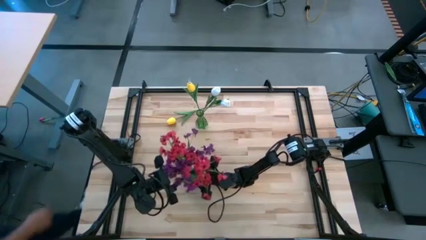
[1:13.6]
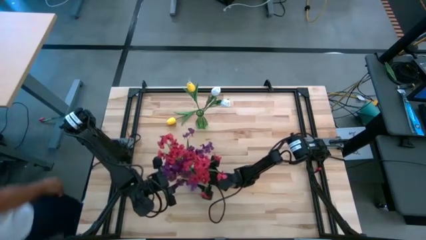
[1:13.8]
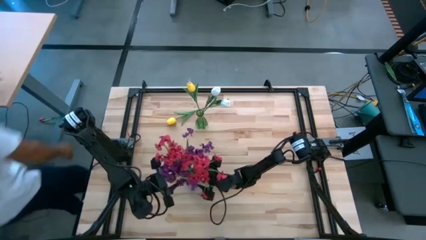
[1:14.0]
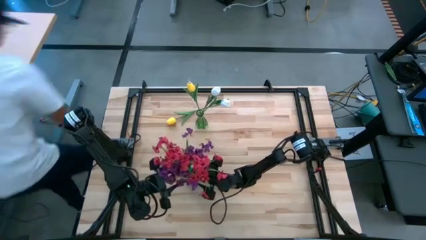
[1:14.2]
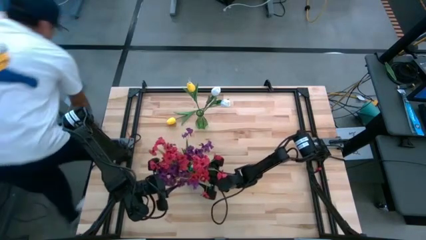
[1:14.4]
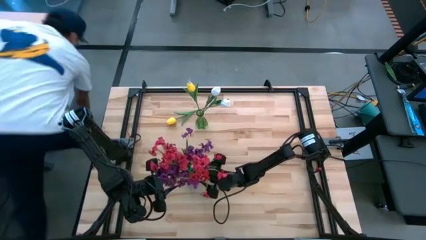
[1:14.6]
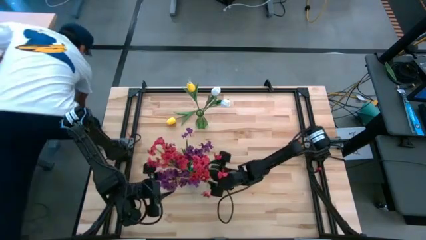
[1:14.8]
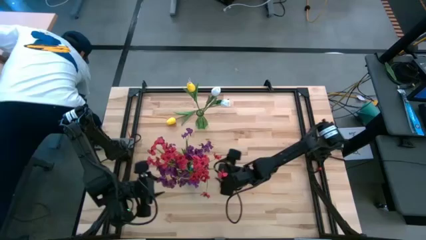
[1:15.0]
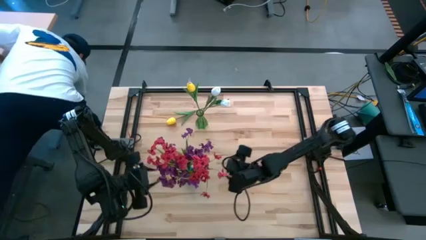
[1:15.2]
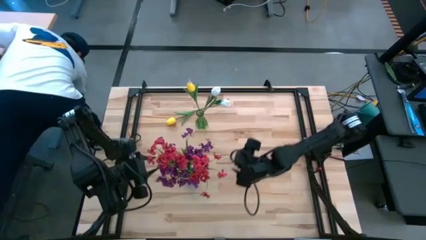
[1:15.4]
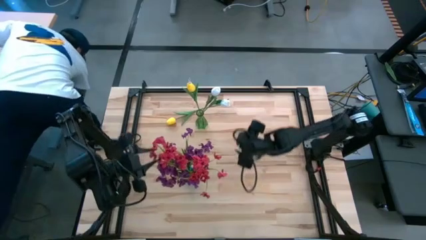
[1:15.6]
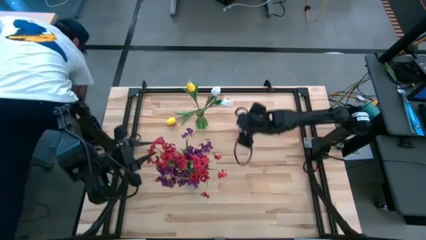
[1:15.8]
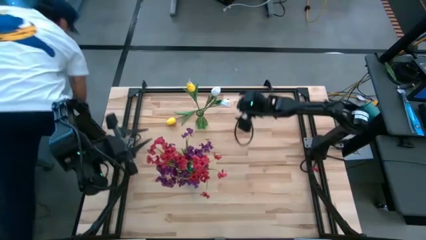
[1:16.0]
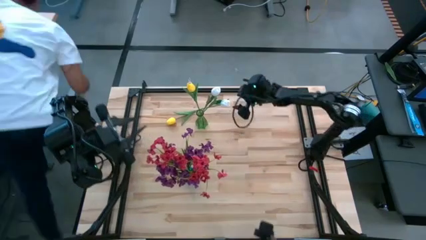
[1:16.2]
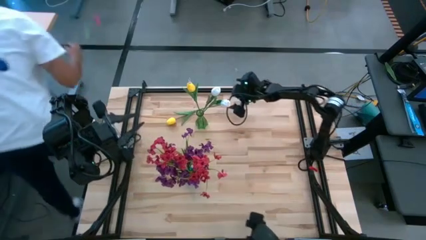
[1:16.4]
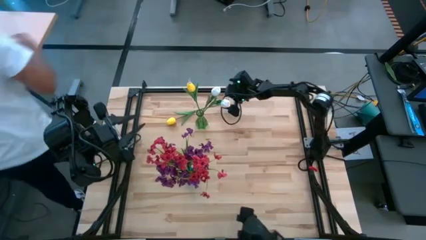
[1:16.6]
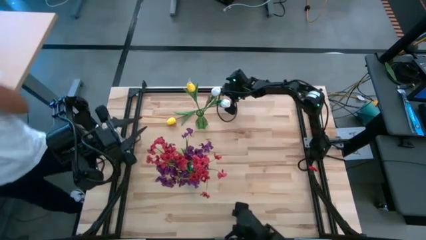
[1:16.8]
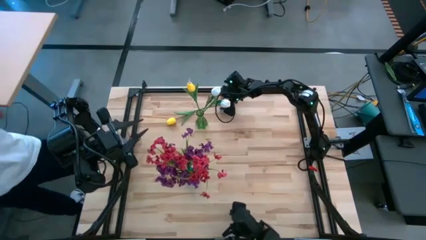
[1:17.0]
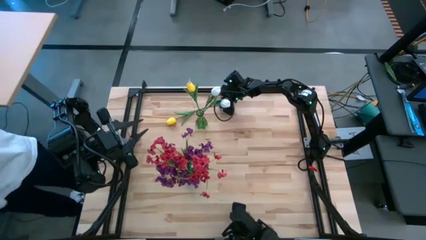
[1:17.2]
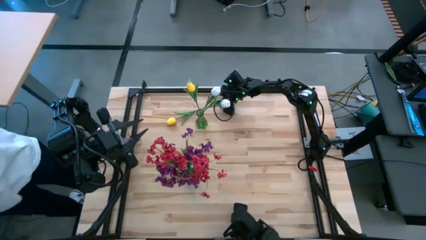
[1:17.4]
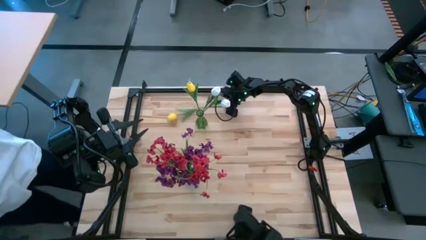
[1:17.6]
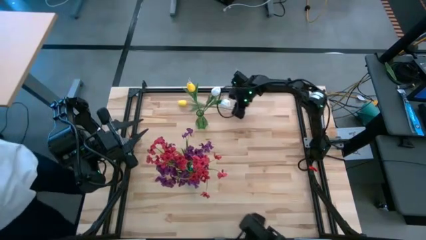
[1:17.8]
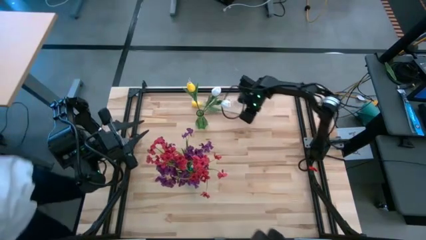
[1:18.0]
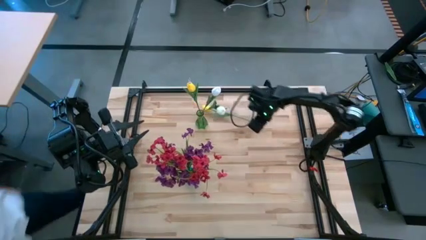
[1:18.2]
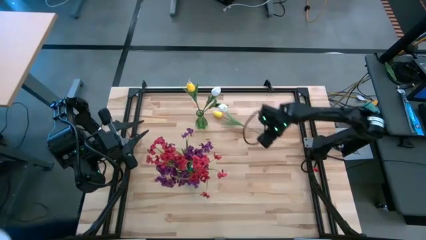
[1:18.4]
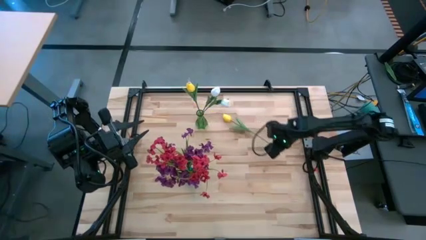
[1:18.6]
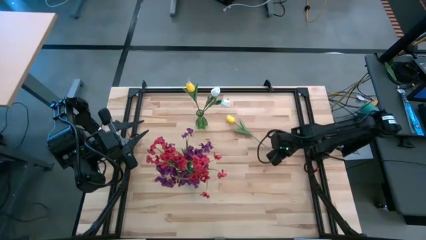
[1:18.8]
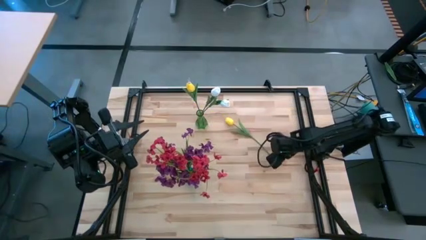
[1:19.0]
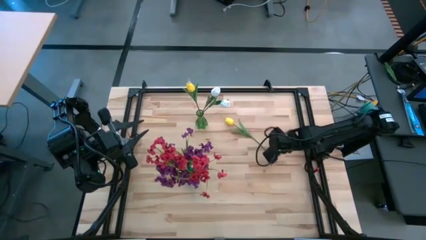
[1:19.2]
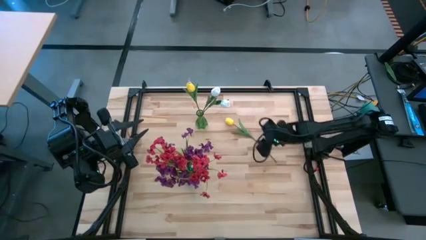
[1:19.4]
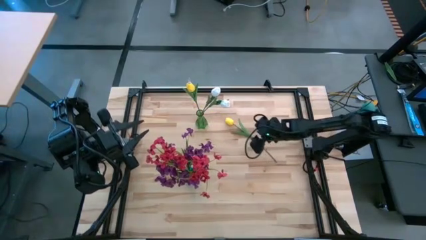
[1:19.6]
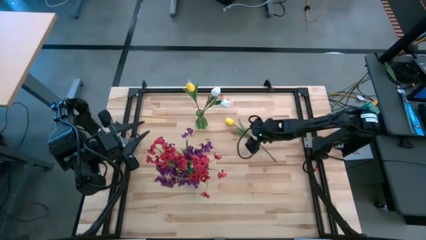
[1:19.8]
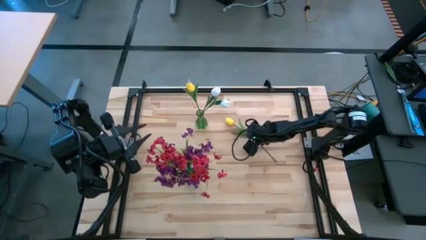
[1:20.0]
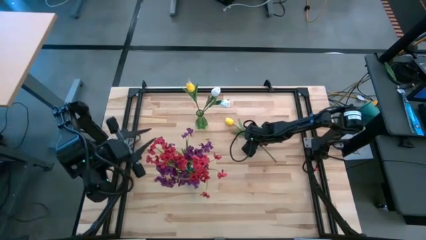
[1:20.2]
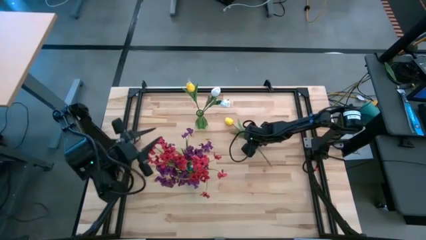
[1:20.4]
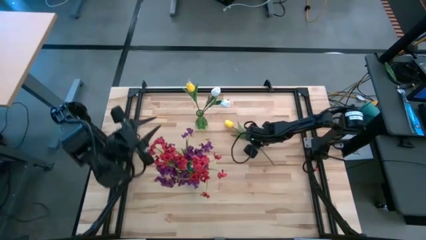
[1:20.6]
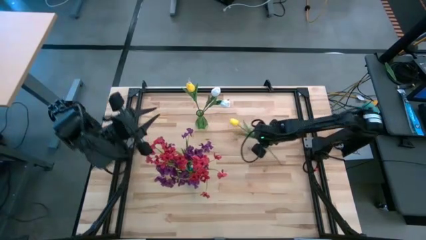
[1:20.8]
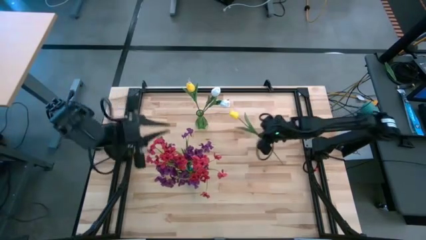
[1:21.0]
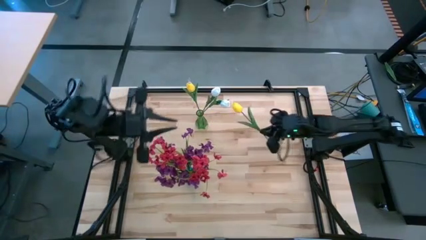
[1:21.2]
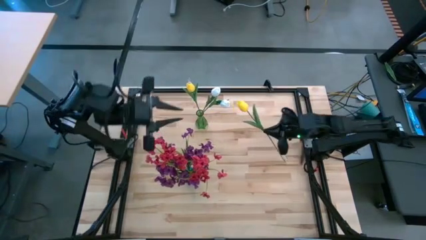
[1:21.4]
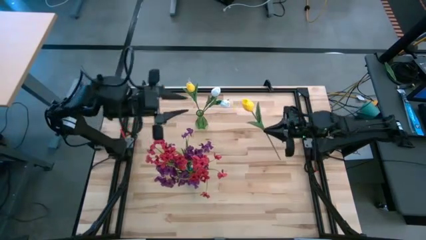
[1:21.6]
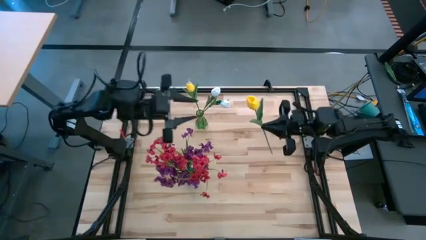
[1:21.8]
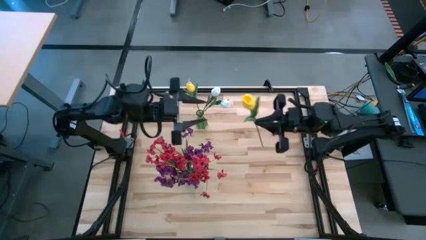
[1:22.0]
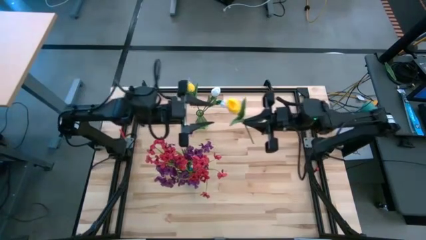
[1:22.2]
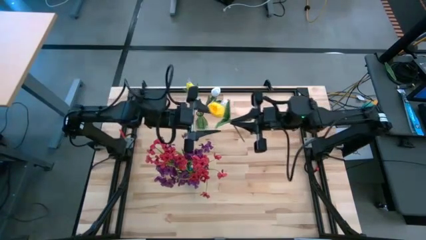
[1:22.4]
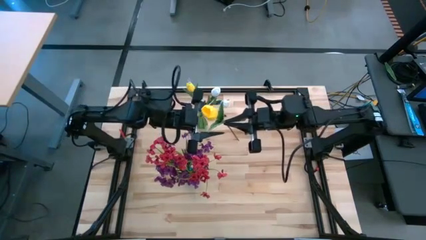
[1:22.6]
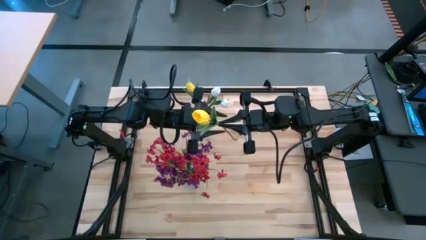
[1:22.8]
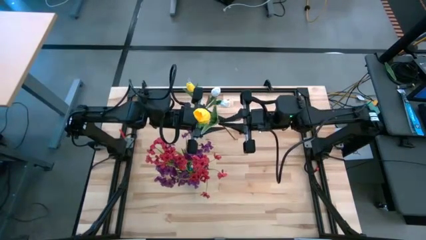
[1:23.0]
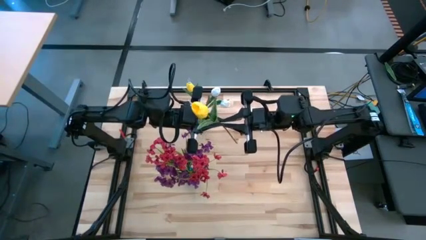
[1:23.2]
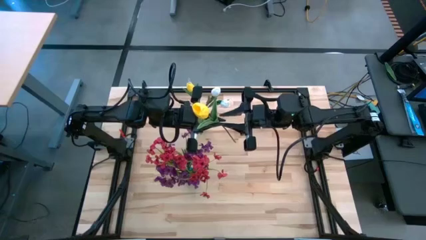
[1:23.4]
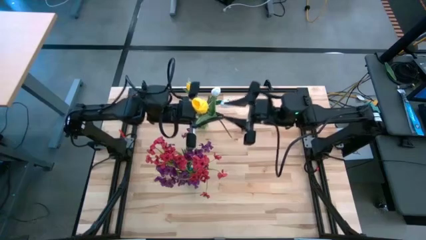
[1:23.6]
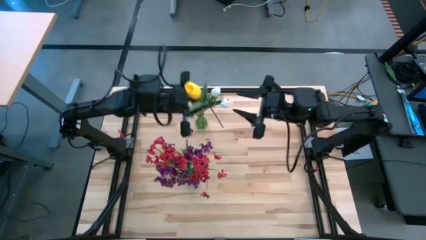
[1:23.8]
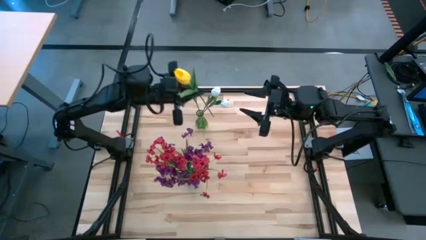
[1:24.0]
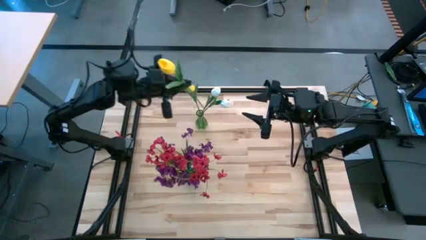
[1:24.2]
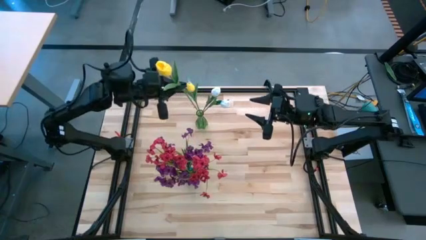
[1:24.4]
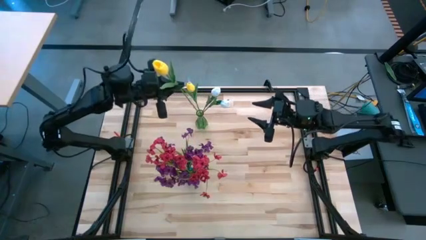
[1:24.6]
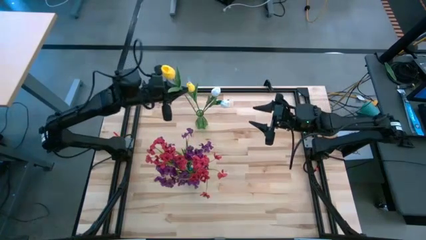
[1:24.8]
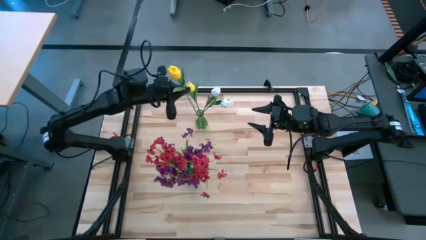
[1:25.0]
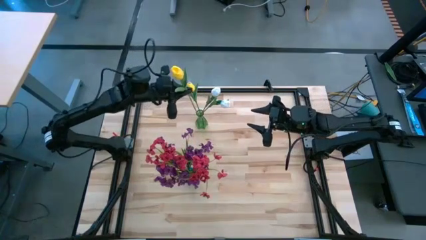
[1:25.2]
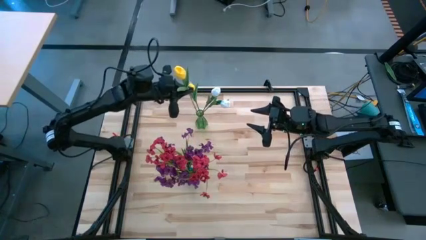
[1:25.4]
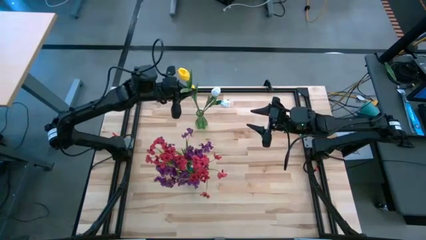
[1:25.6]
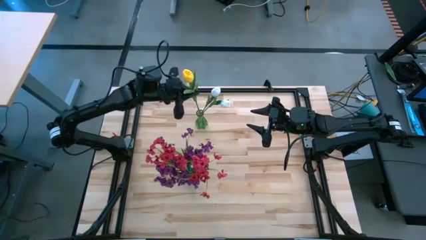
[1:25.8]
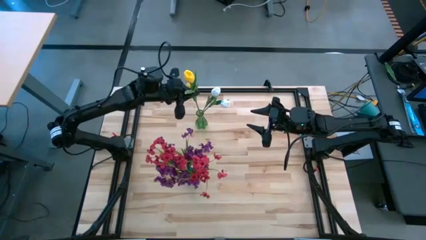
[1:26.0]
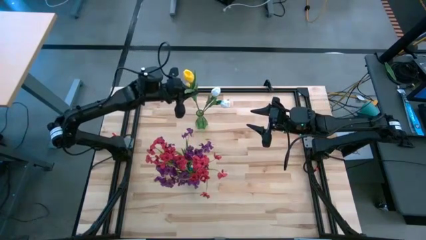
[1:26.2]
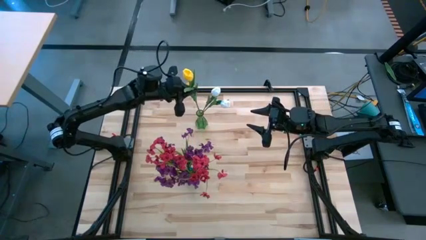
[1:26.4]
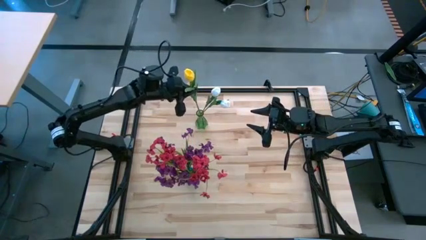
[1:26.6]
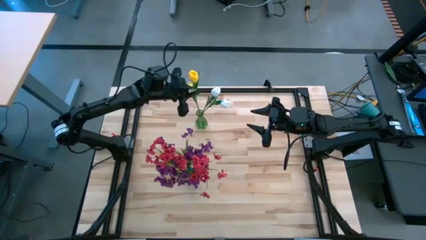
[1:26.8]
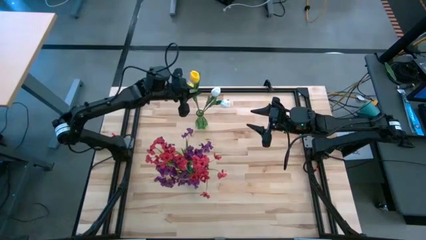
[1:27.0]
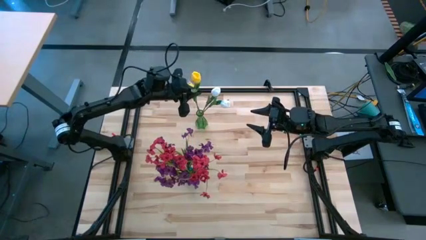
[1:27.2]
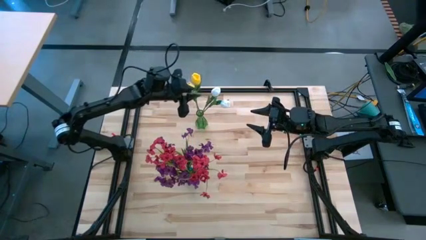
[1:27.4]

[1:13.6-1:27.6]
Task: Sort flowers into vase by color
Put the yellow flower into the green vase
